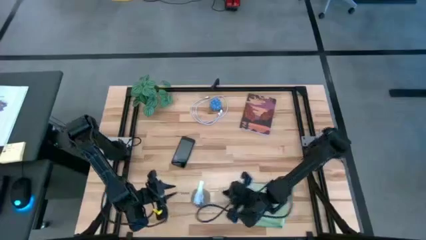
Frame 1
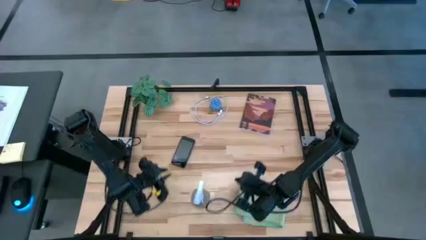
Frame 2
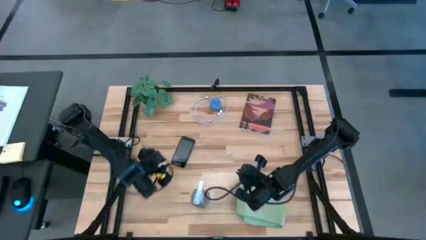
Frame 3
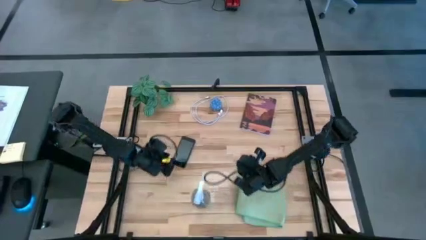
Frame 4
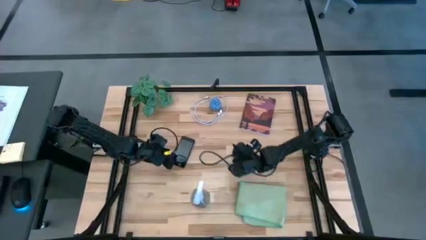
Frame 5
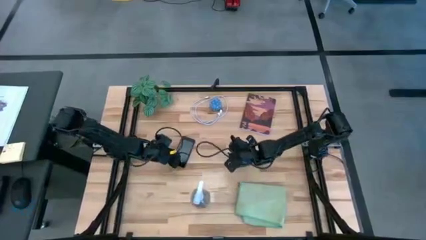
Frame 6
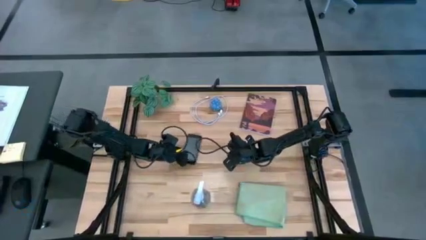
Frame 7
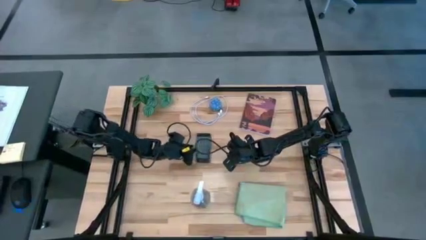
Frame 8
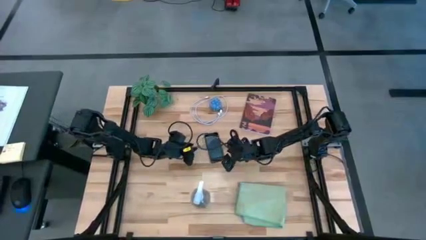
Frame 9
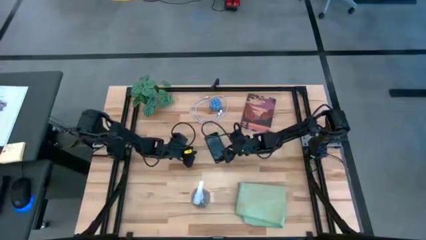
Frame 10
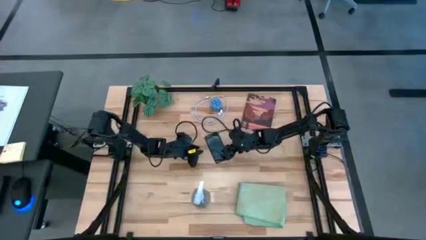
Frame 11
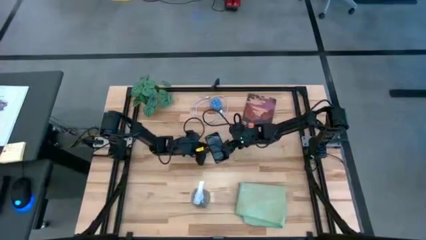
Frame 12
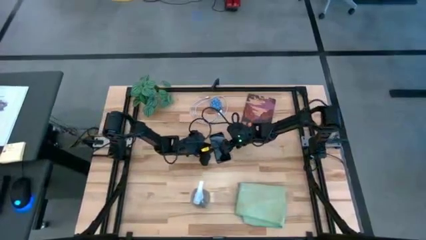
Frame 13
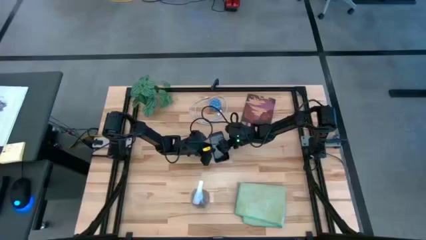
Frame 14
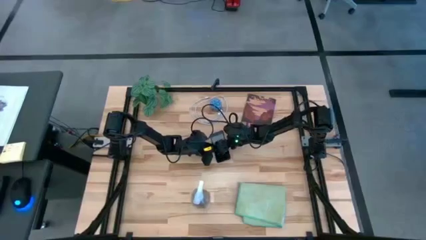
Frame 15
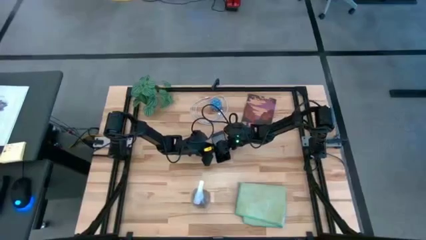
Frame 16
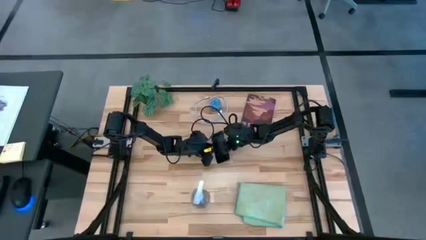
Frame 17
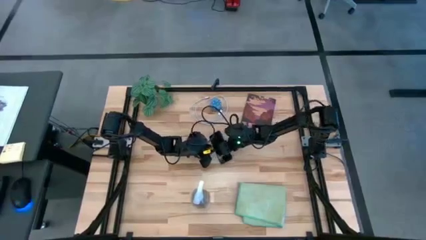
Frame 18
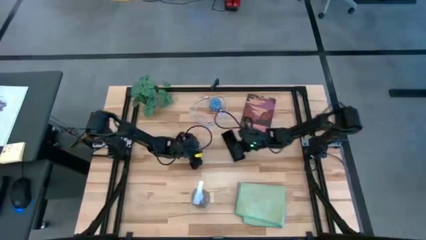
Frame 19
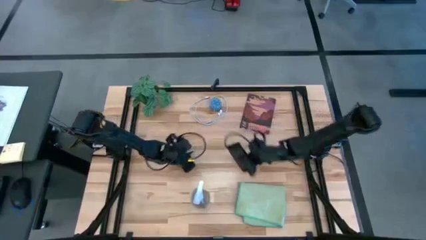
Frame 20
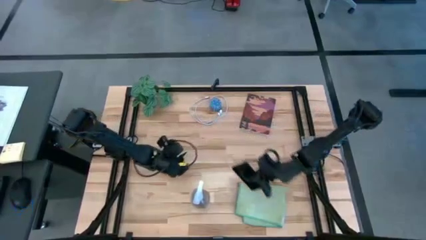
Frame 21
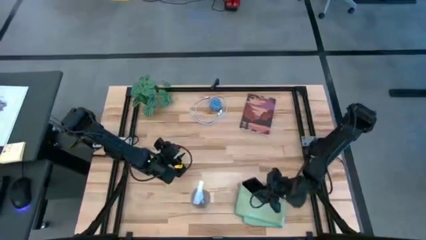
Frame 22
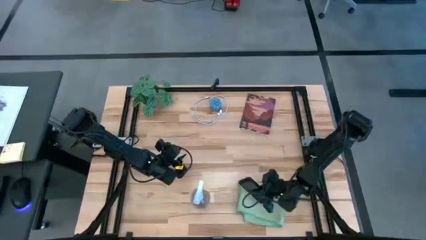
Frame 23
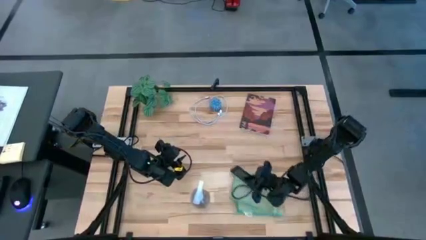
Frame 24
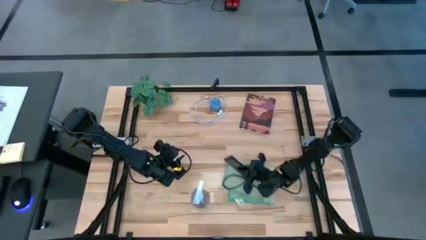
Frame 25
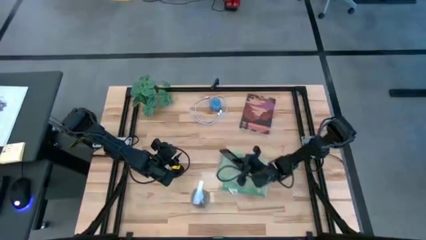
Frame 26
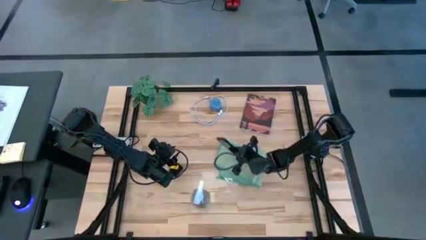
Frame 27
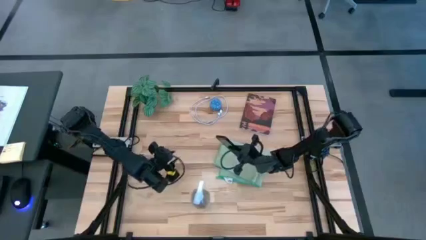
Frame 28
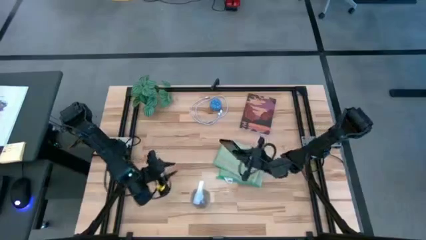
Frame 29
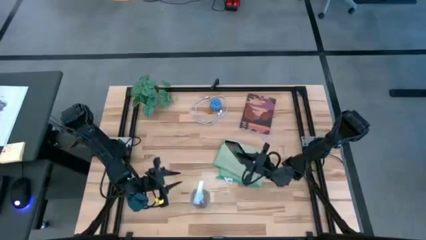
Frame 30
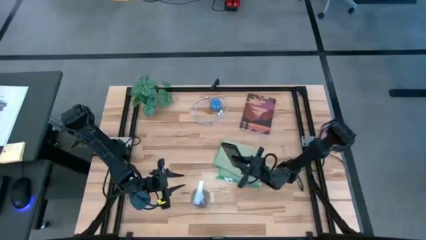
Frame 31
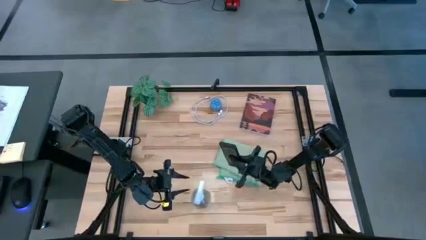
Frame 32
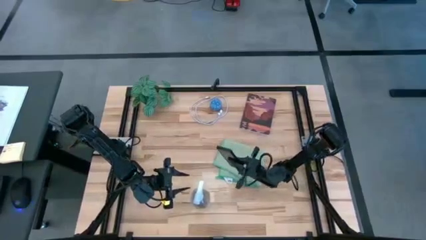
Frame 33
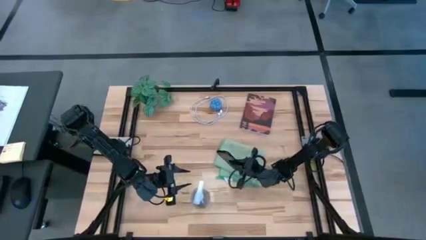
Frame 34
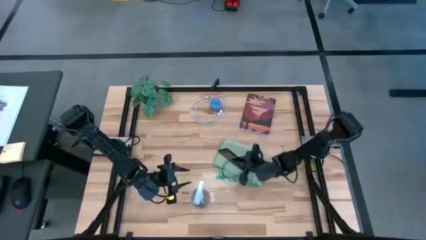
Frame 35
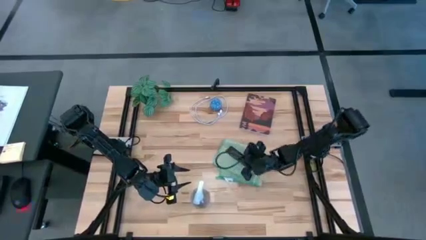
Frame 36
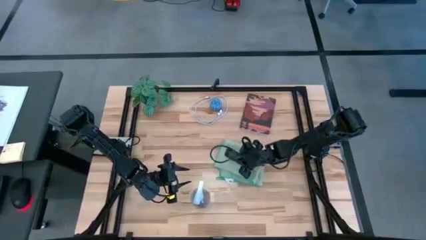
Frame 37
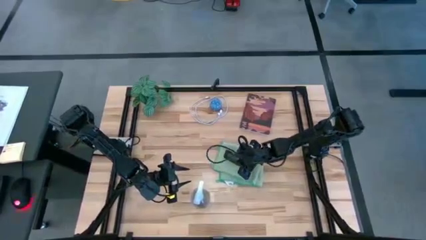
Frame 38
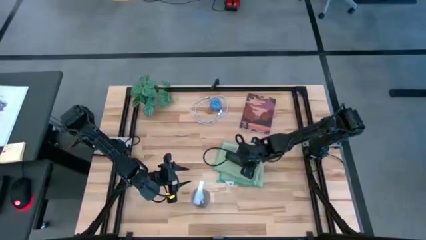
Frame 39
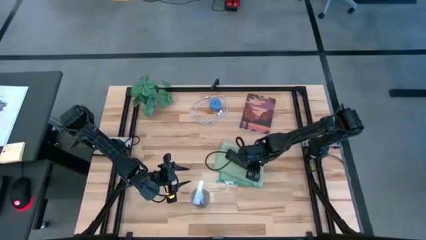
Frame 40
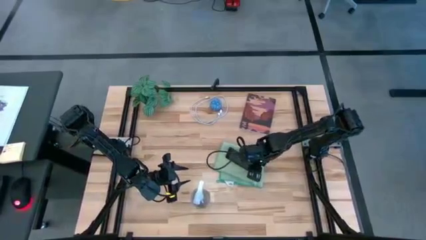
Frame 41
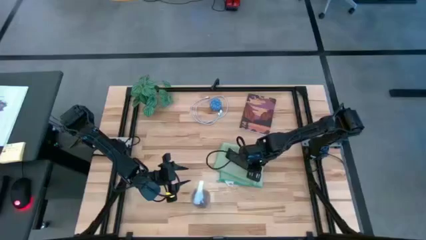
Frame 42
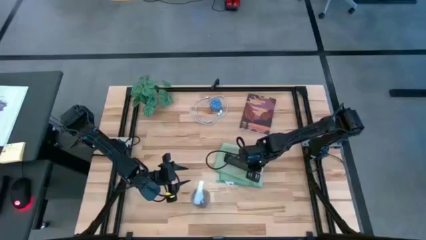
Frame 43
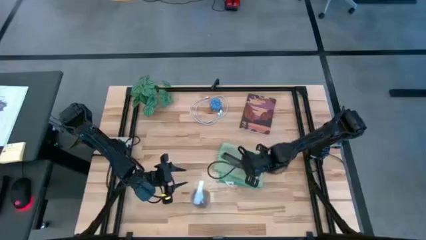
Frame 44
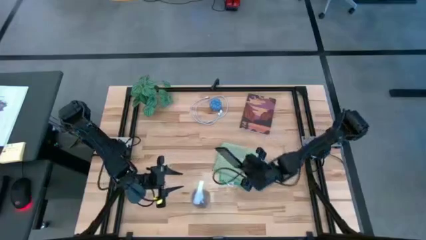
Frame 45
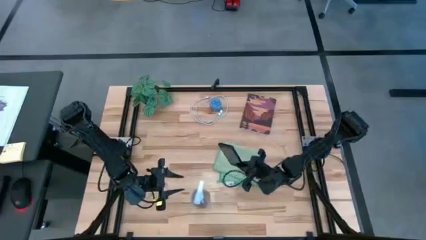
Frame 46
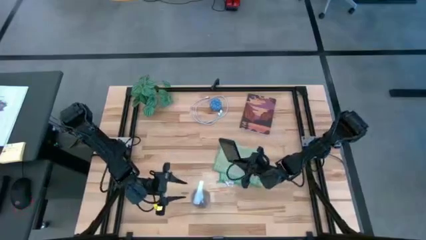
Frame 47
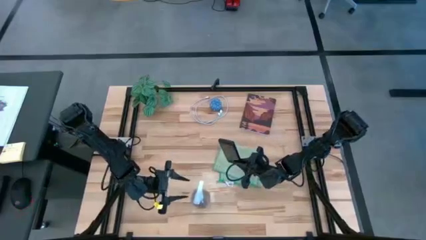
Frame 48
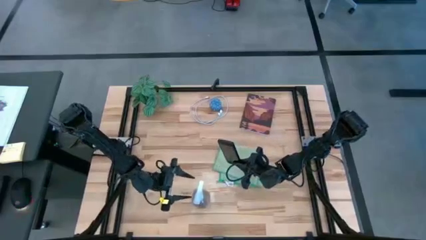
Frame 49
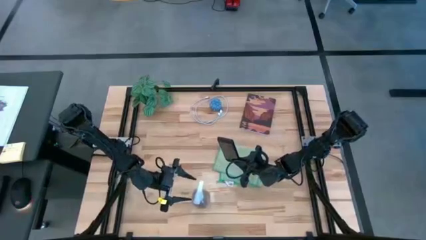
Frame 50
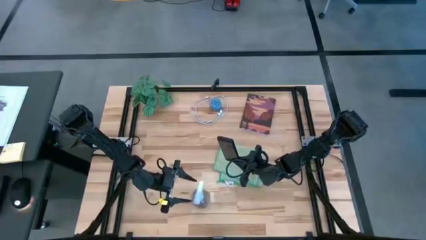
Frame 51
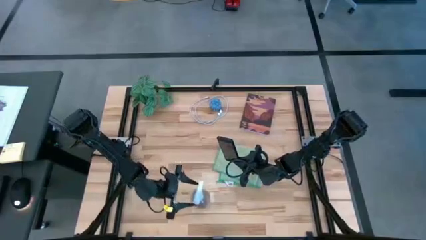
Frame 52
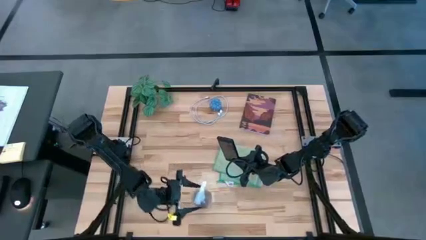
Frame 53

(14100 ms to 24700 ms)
Task: Apply microfiber cloth
Spray the front of the black cellphone with the spray bottle
